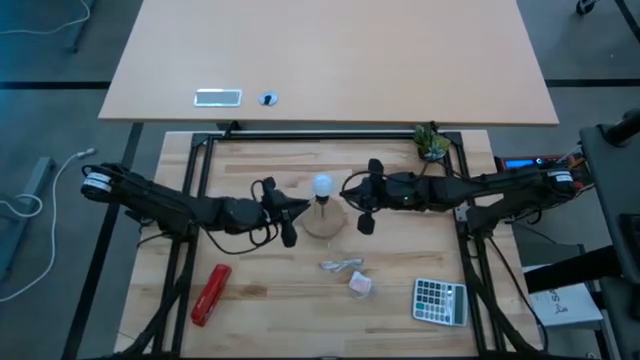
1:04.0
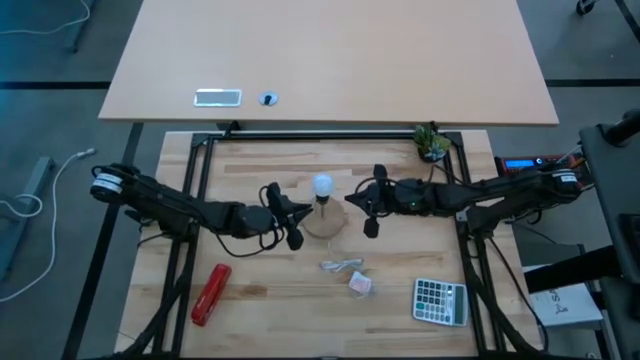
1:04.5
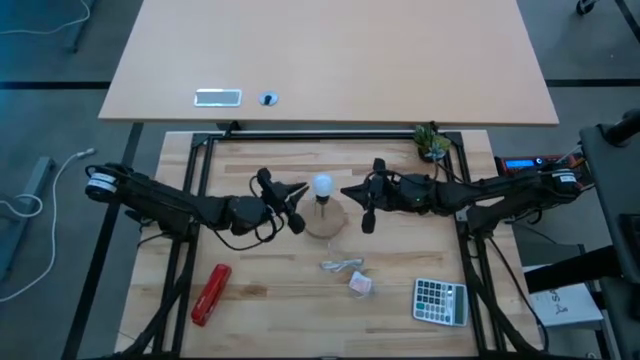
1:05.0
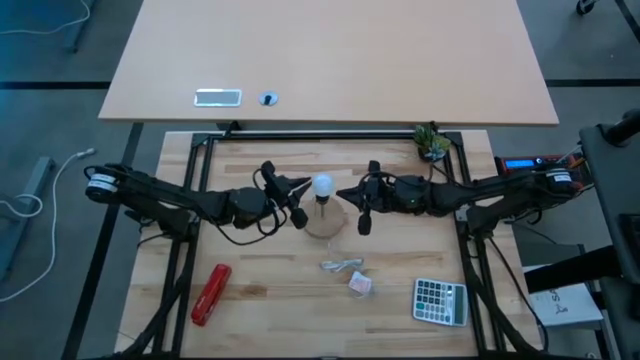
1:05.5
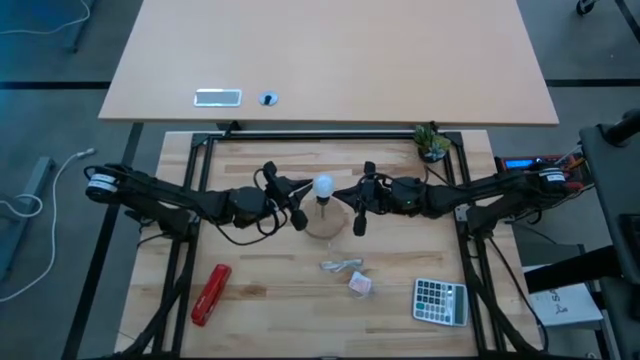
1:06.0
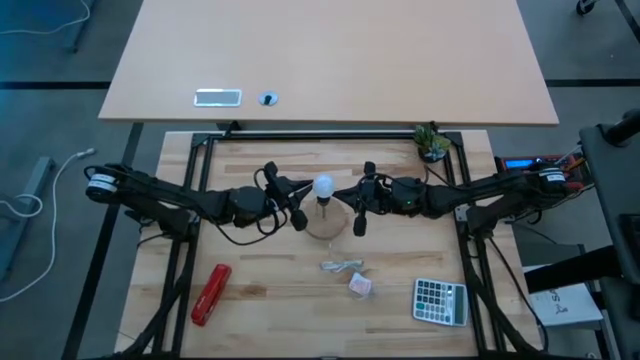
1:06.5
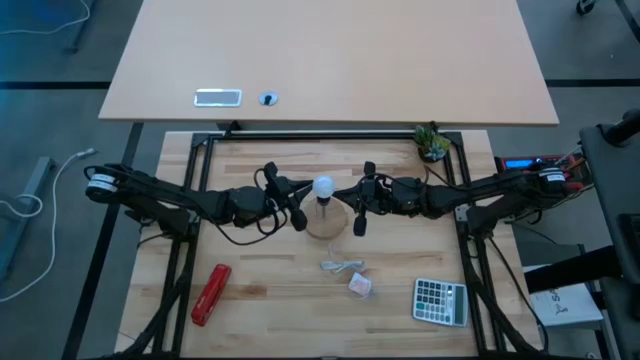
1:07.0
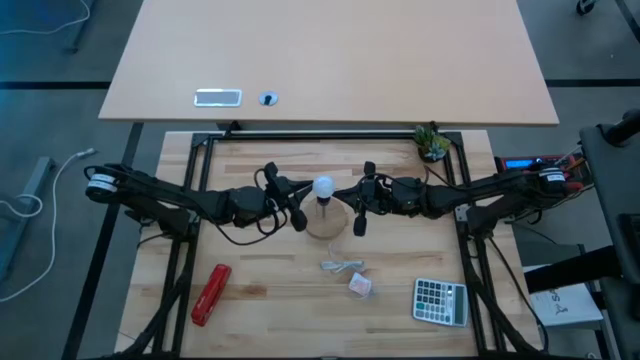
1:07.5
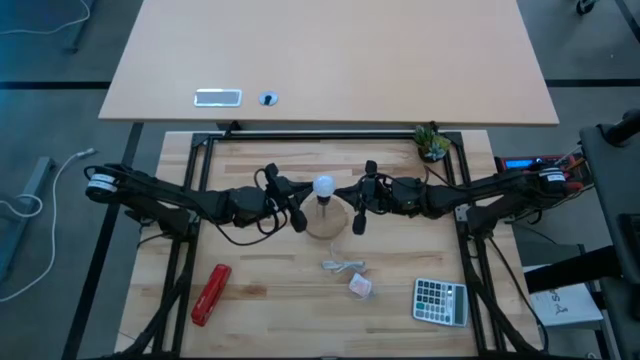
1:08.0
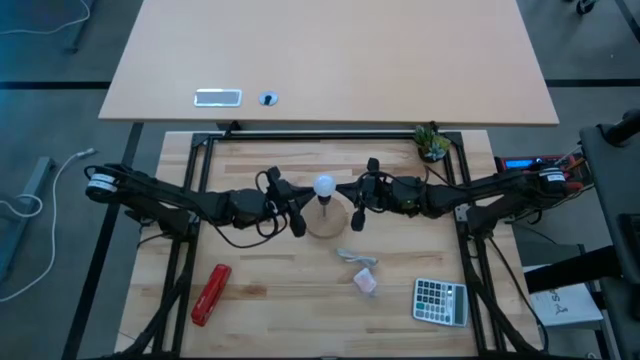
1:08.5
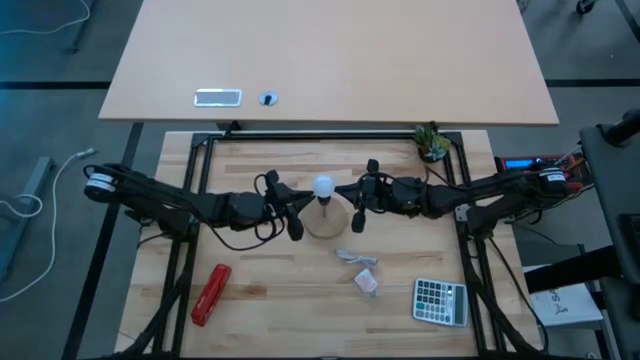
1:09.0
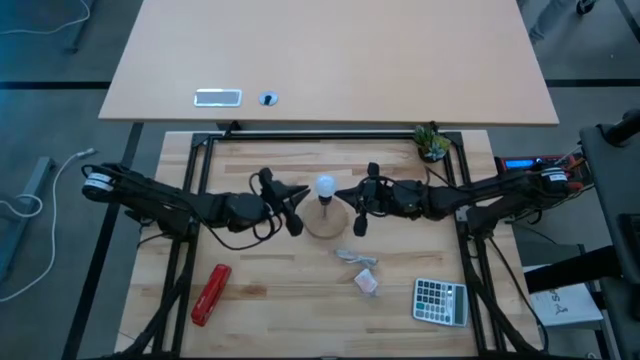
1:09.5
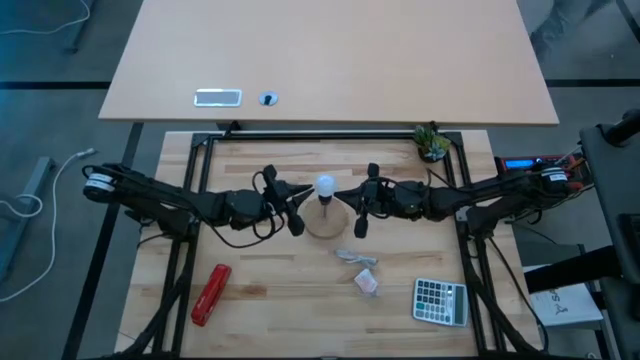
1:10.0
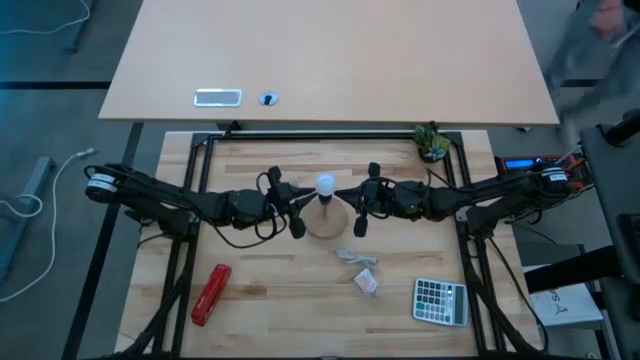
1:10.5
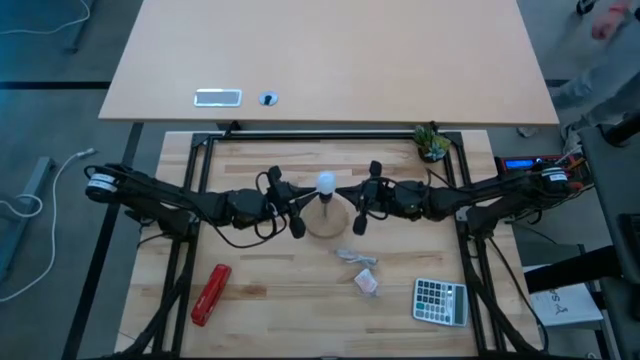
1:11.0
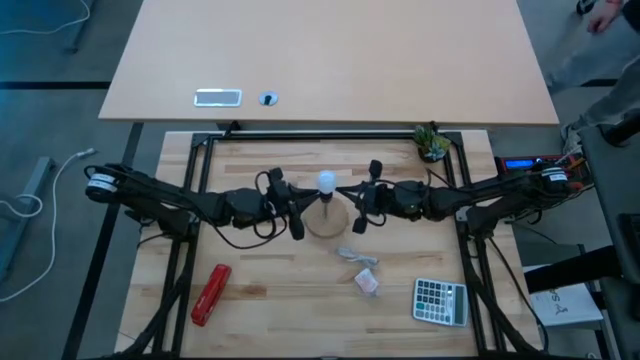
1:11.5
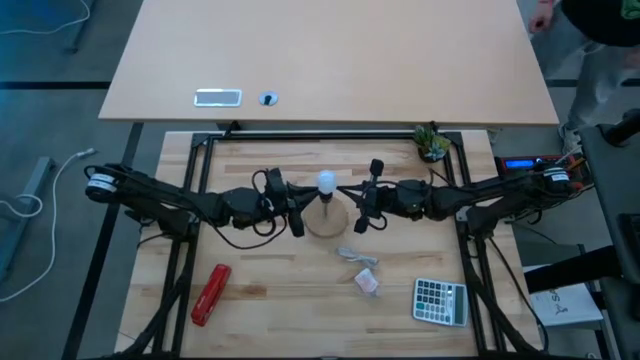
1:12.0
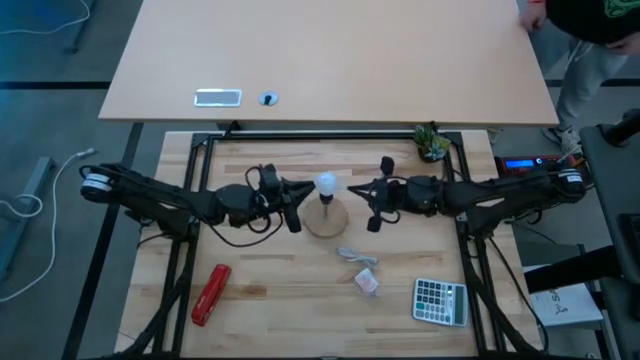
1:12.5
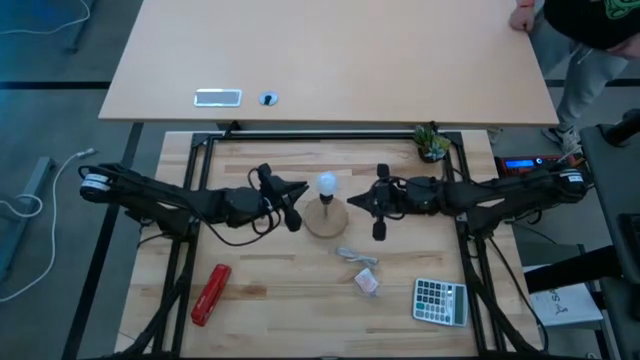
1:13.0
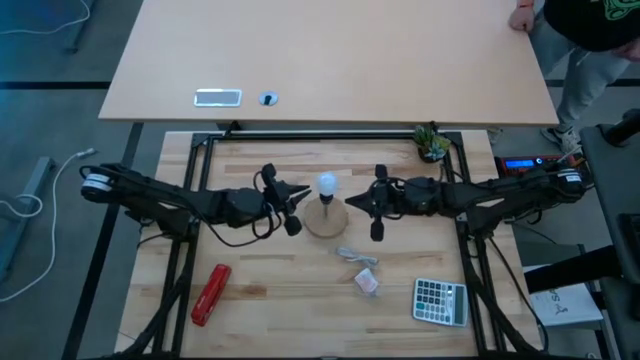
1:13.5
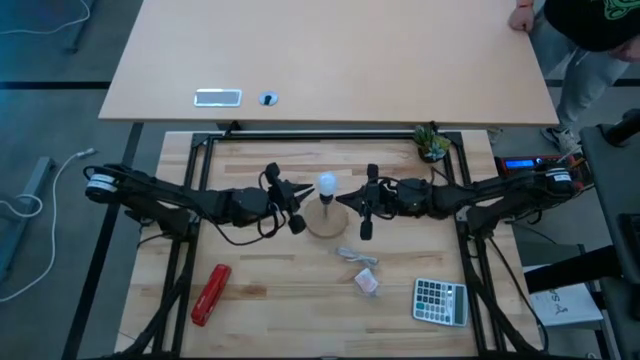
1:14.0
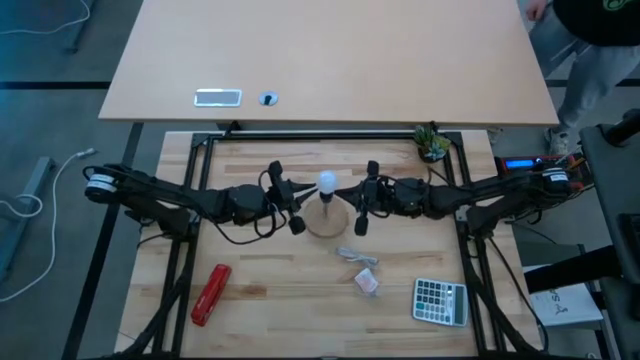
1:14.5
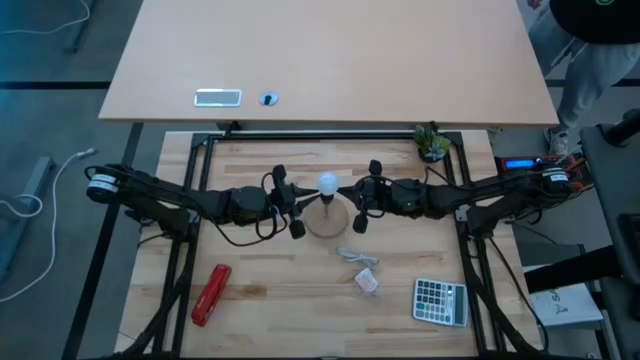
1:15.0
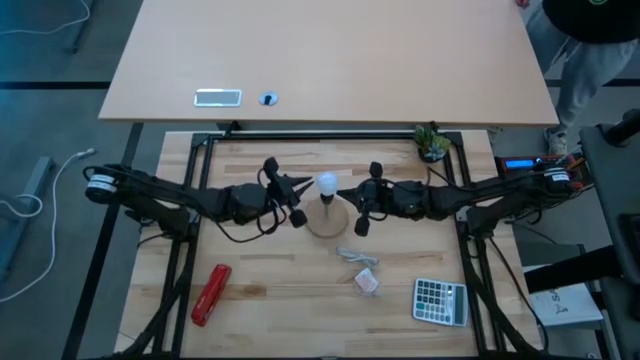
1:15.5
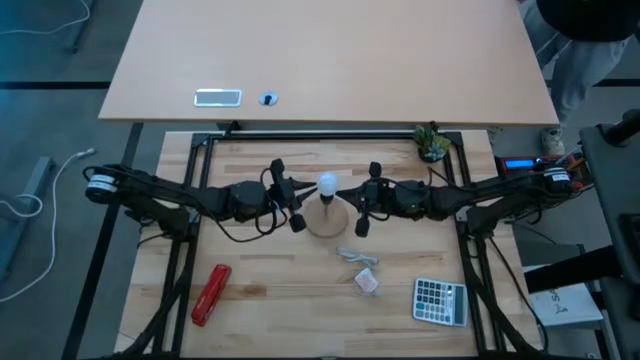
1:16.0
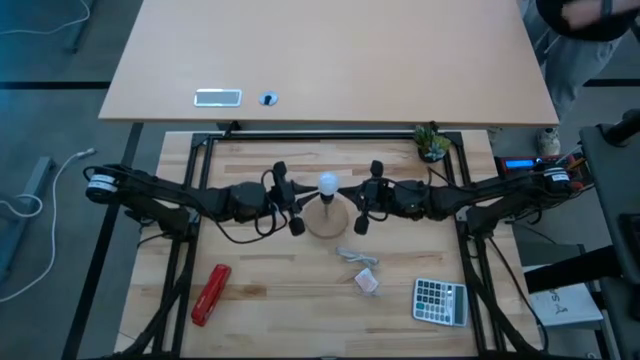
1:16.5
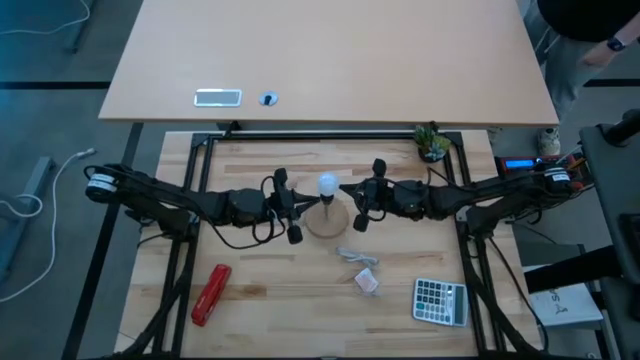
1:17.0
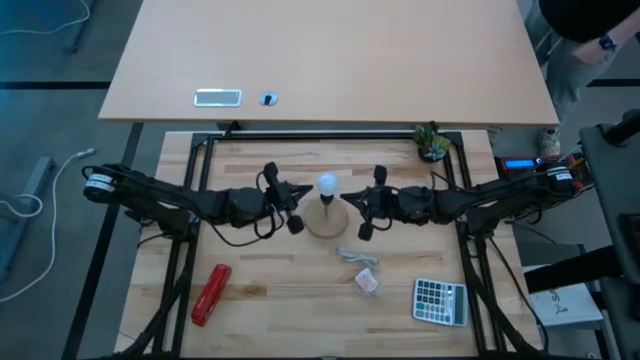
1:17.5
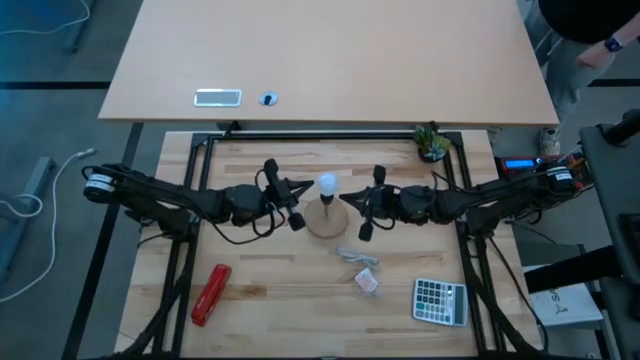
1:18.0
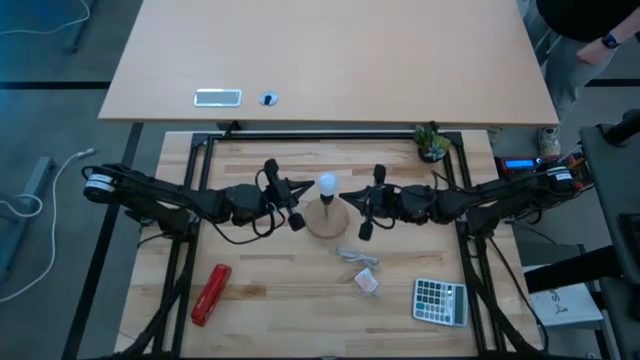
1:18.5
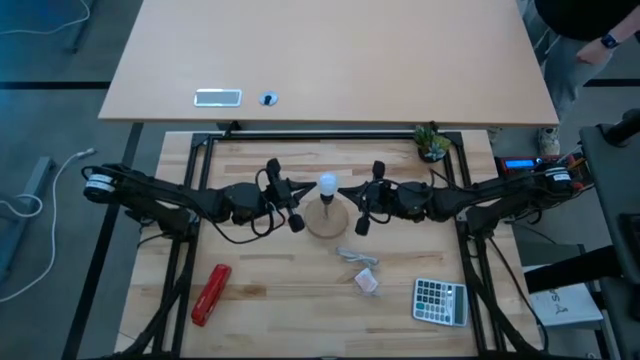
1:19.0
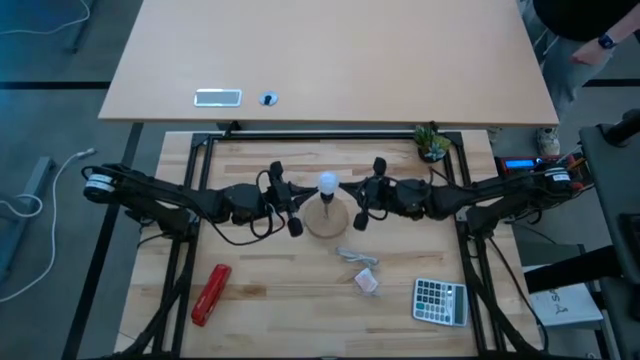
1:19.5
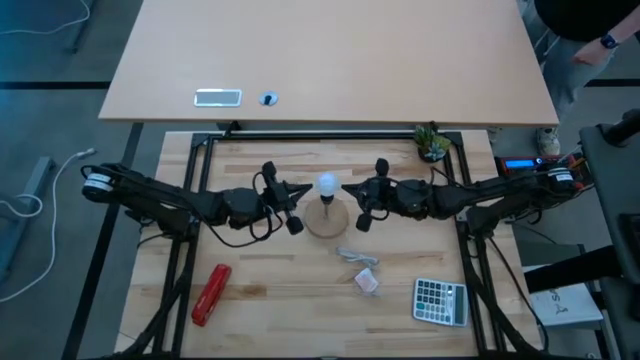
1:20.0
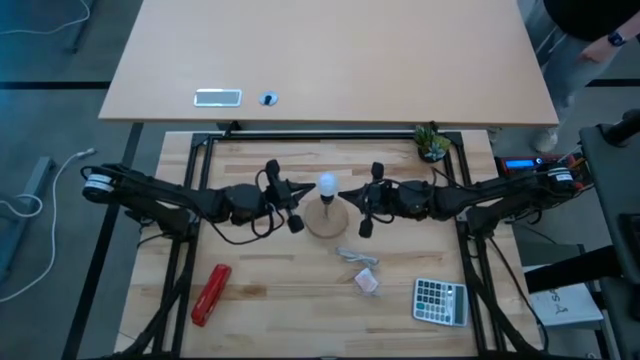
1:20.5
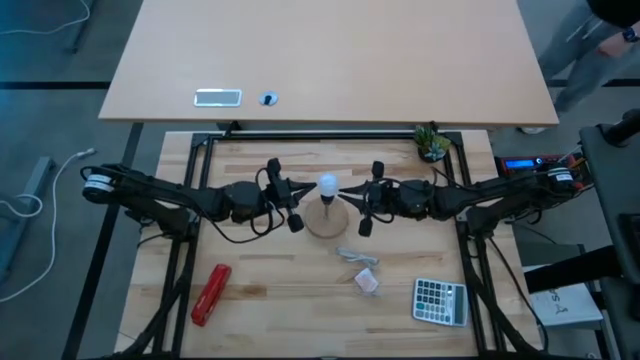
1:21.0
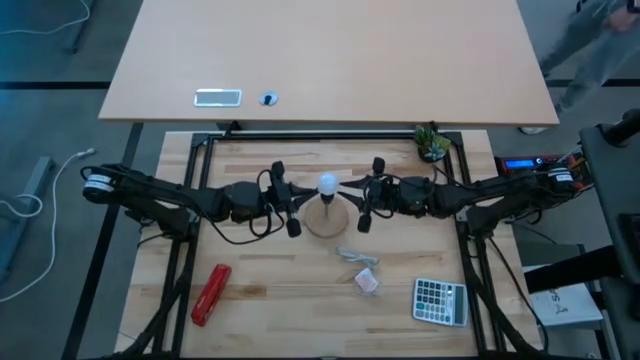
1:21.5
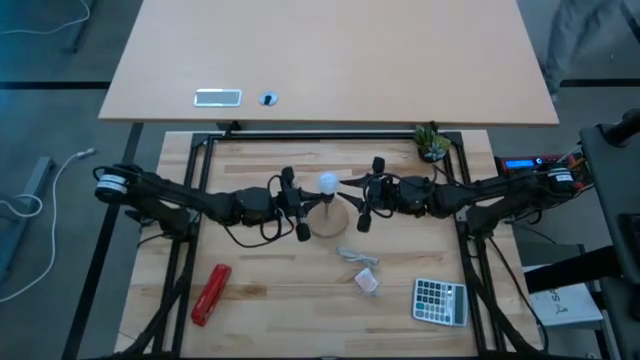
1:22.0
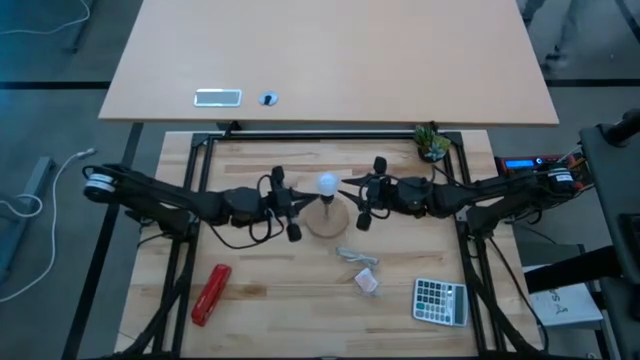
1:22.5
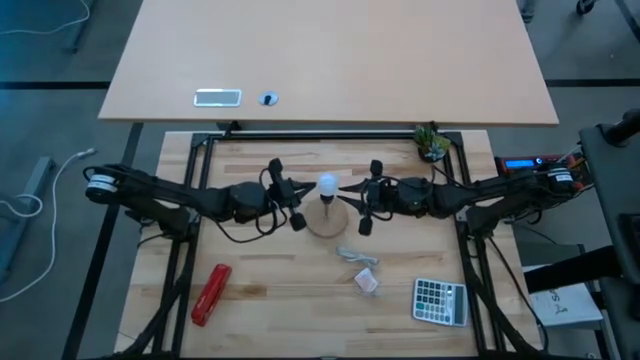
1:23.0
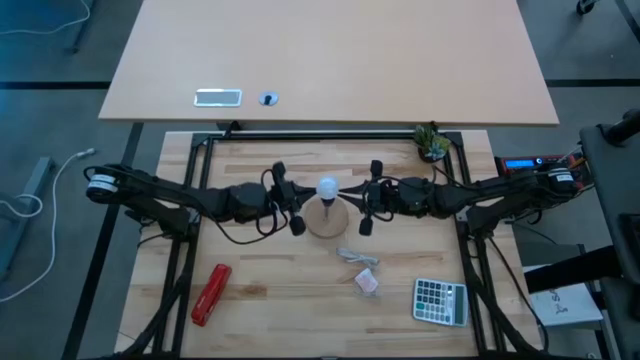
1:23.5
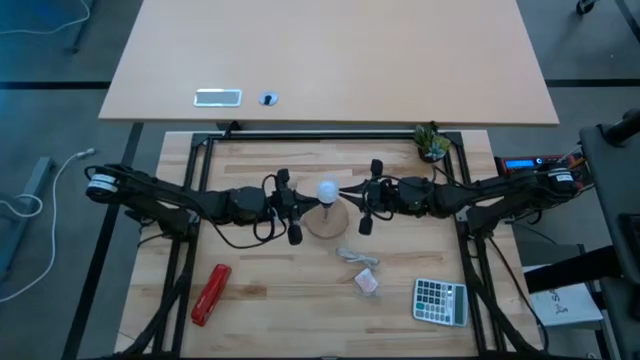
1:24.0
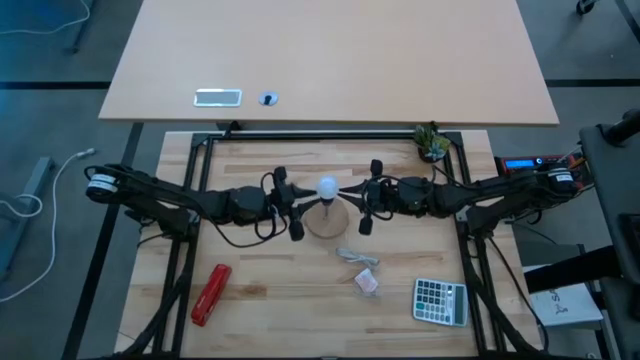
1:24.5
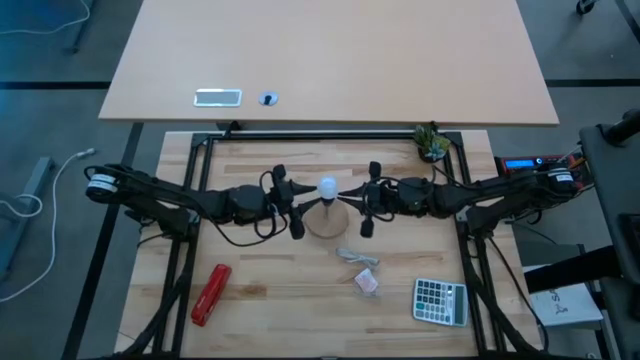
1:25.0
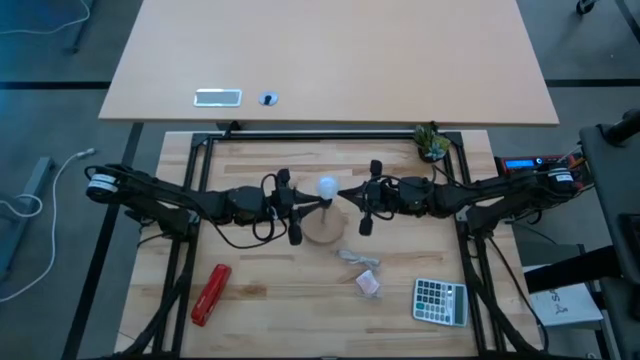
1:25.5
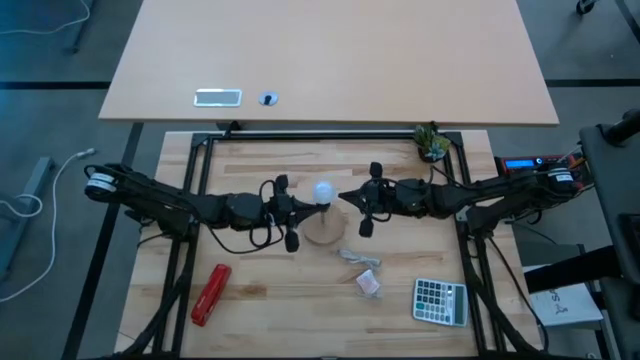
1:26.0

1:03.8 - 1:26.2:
Task: Screw lightbulb
Remove the lightbulb from the lamp
